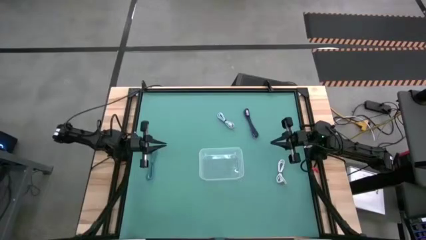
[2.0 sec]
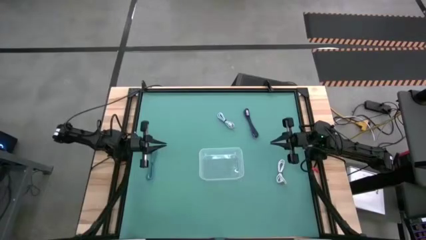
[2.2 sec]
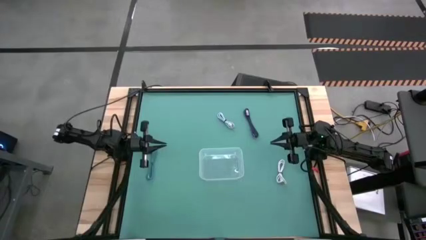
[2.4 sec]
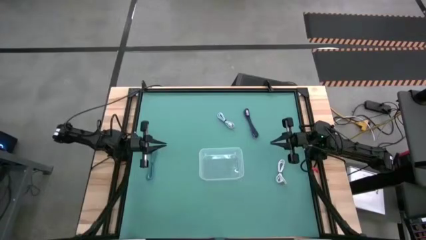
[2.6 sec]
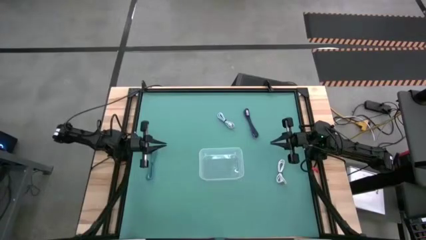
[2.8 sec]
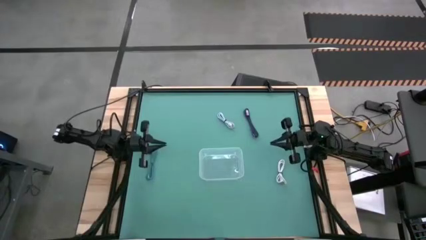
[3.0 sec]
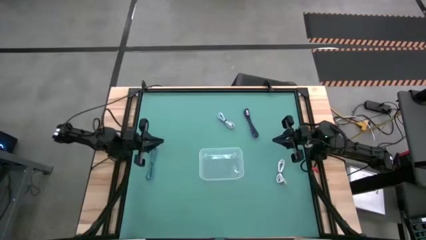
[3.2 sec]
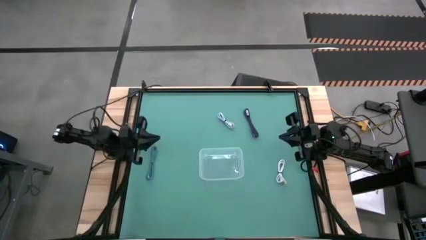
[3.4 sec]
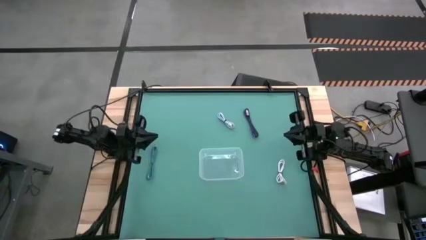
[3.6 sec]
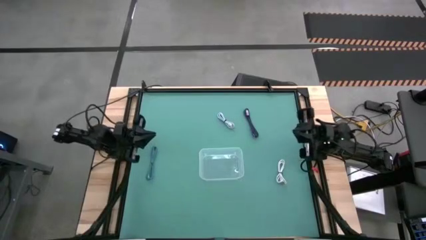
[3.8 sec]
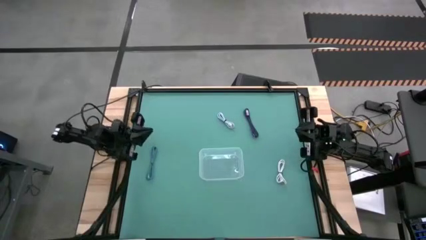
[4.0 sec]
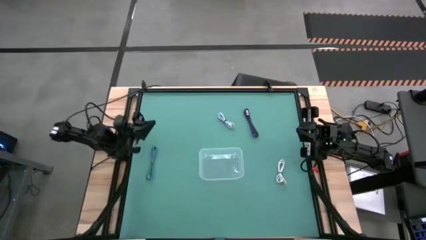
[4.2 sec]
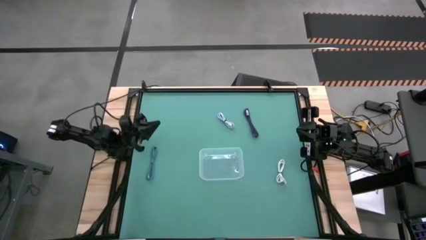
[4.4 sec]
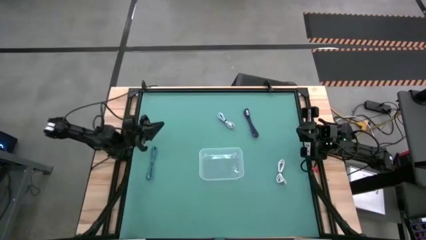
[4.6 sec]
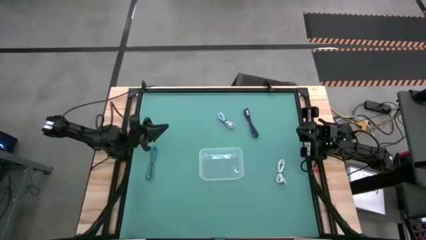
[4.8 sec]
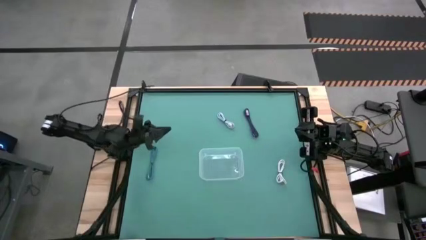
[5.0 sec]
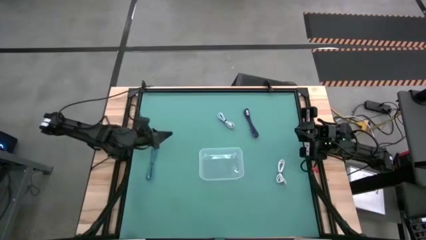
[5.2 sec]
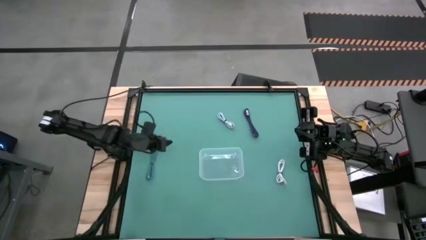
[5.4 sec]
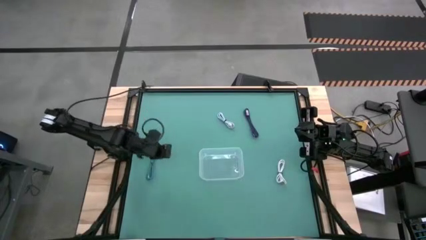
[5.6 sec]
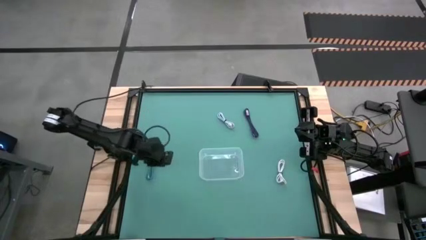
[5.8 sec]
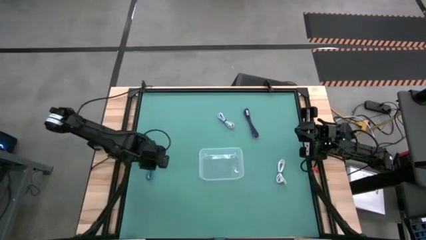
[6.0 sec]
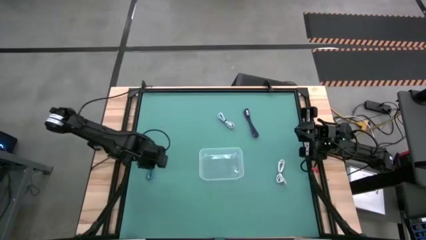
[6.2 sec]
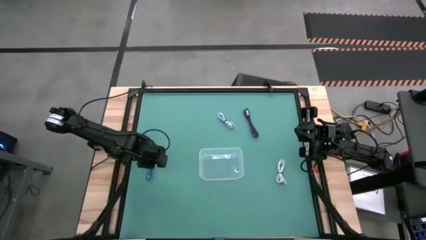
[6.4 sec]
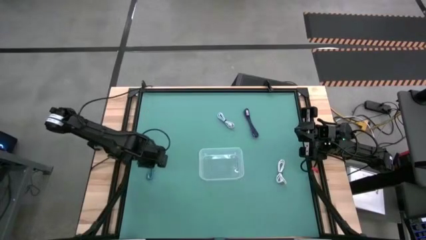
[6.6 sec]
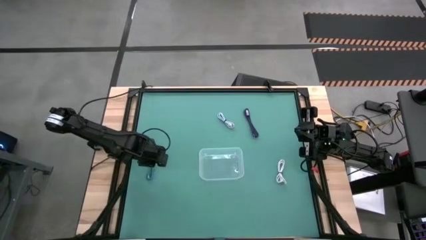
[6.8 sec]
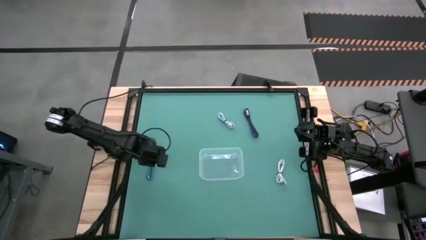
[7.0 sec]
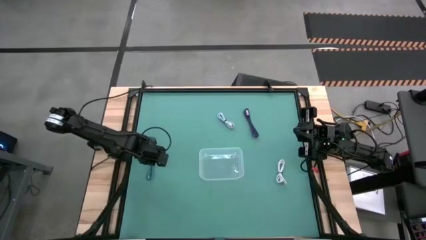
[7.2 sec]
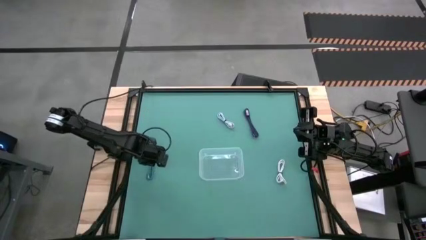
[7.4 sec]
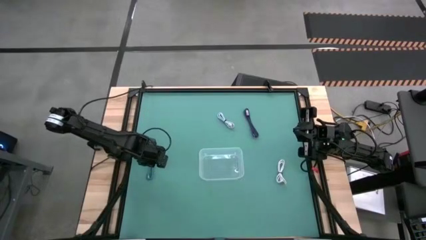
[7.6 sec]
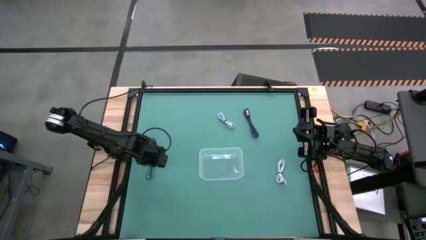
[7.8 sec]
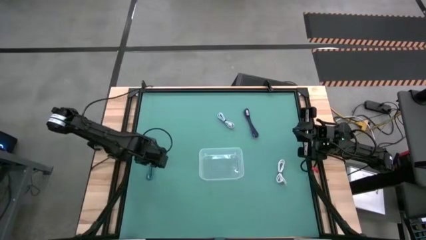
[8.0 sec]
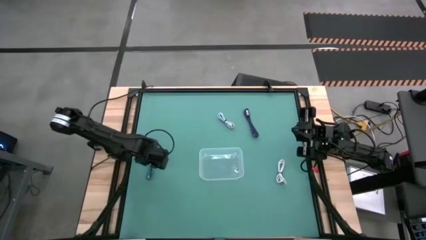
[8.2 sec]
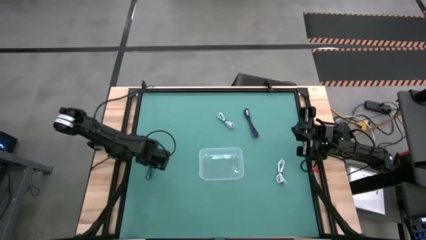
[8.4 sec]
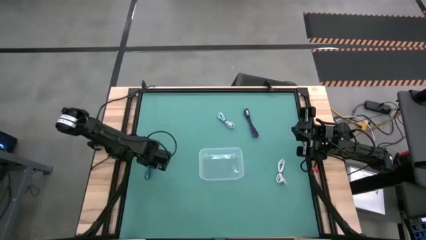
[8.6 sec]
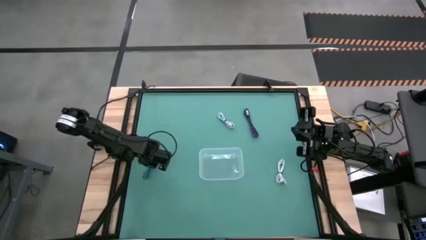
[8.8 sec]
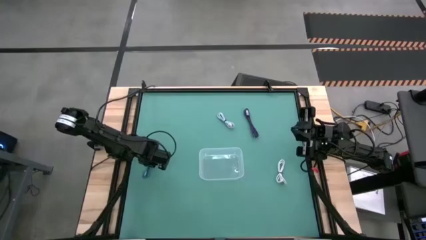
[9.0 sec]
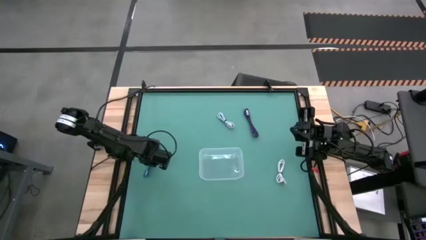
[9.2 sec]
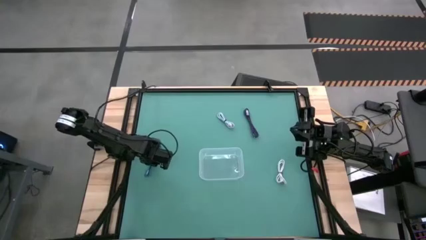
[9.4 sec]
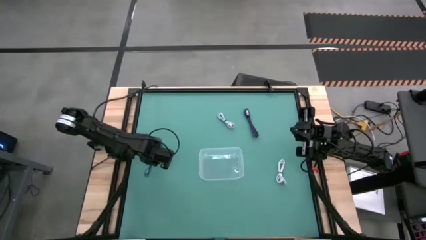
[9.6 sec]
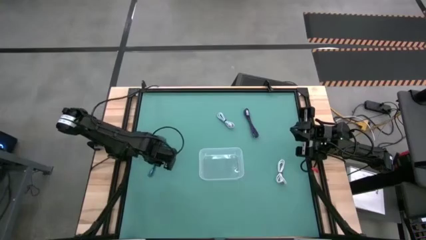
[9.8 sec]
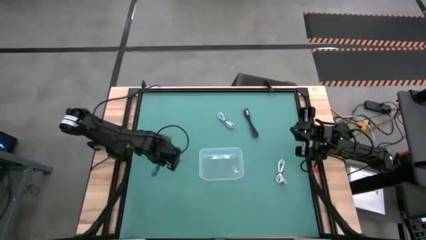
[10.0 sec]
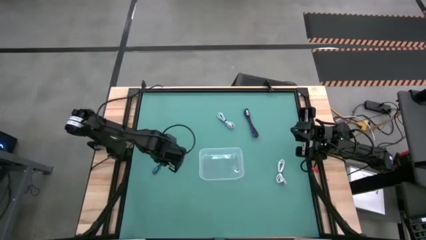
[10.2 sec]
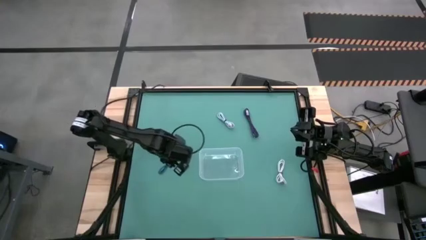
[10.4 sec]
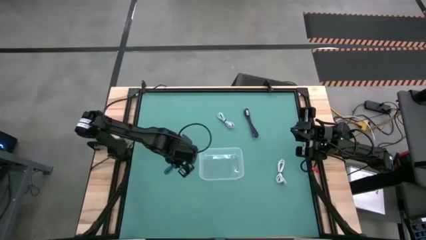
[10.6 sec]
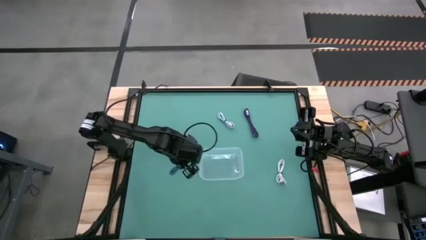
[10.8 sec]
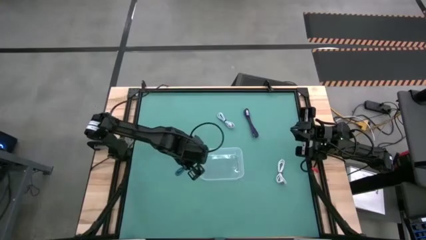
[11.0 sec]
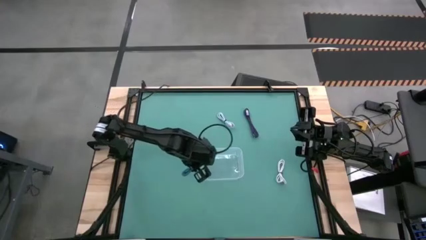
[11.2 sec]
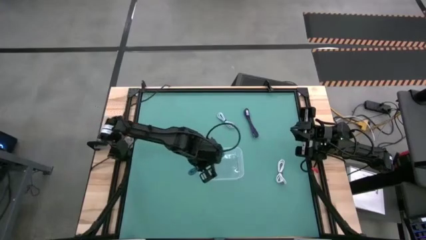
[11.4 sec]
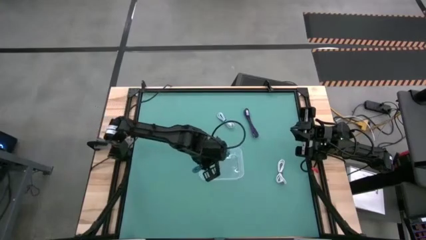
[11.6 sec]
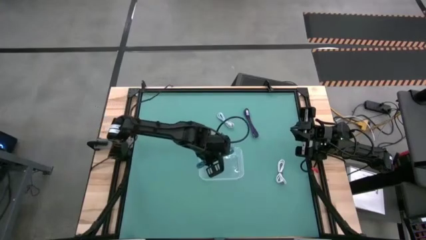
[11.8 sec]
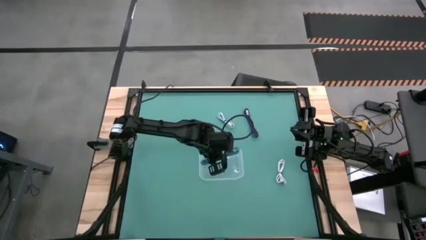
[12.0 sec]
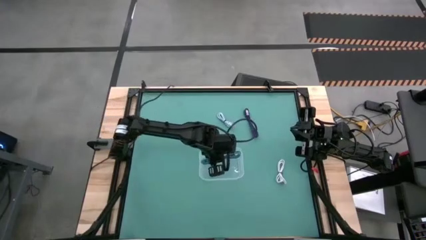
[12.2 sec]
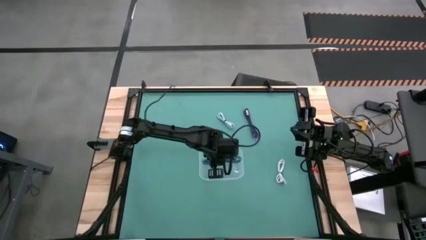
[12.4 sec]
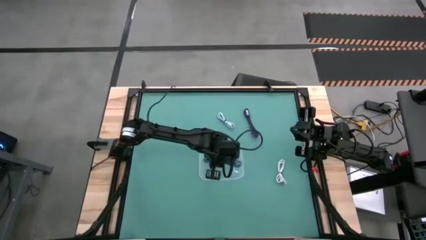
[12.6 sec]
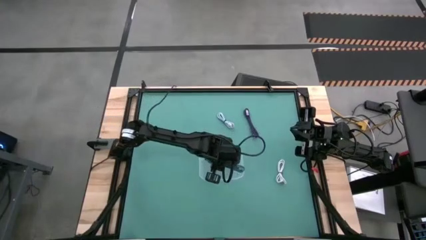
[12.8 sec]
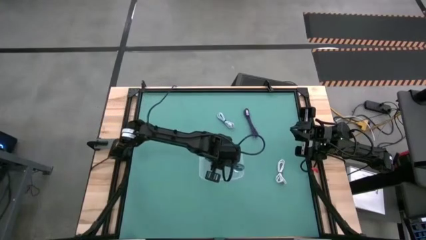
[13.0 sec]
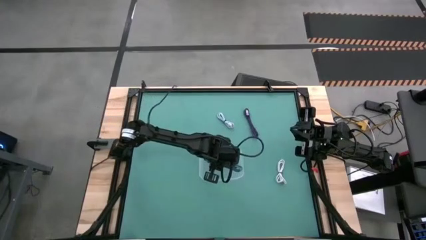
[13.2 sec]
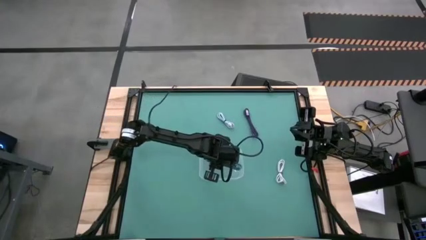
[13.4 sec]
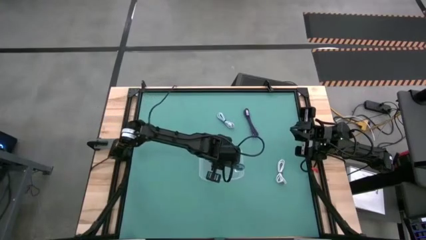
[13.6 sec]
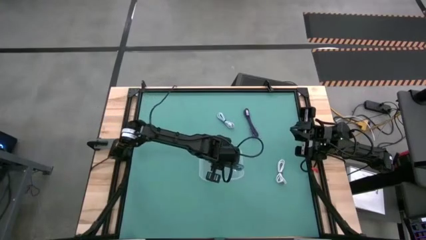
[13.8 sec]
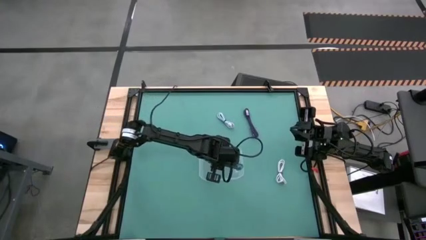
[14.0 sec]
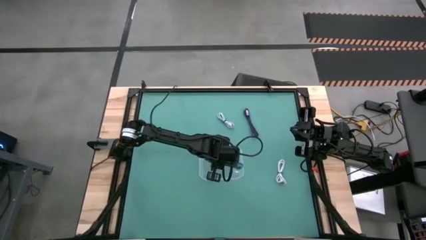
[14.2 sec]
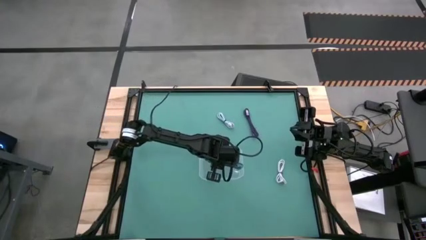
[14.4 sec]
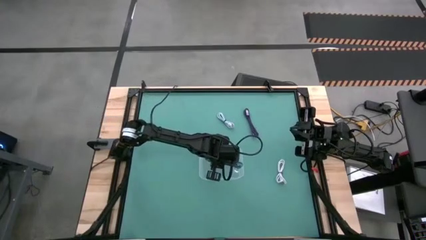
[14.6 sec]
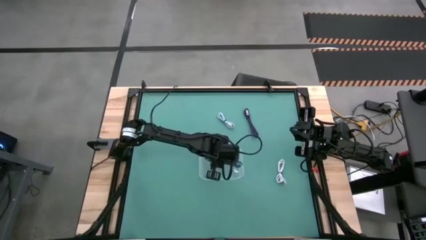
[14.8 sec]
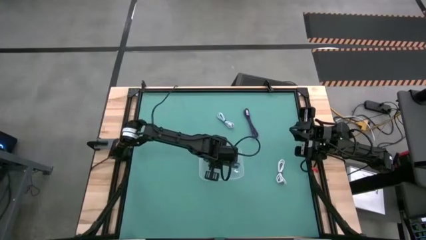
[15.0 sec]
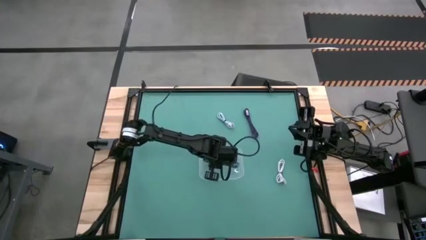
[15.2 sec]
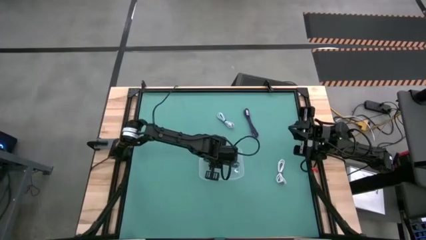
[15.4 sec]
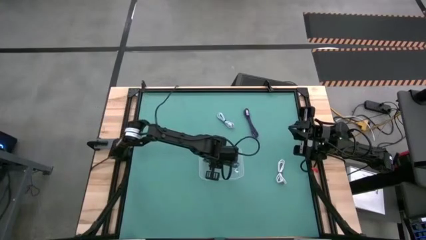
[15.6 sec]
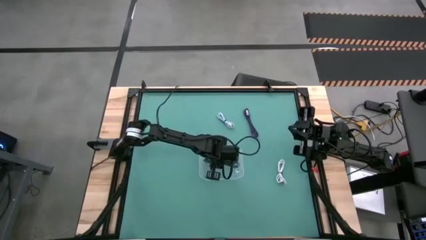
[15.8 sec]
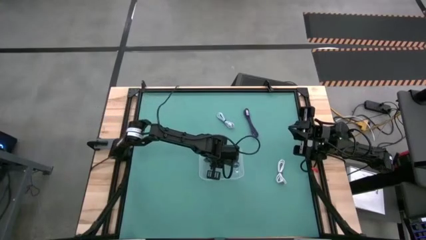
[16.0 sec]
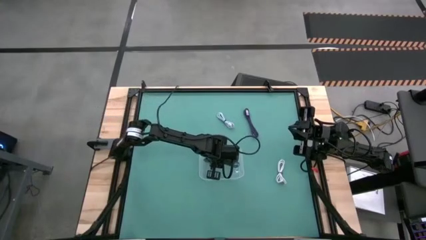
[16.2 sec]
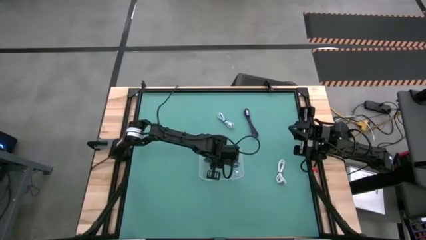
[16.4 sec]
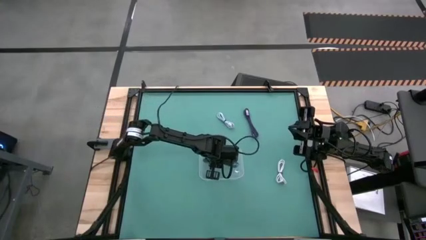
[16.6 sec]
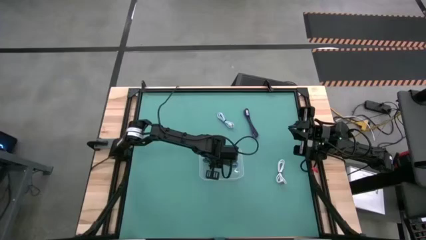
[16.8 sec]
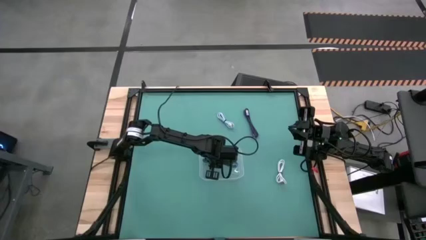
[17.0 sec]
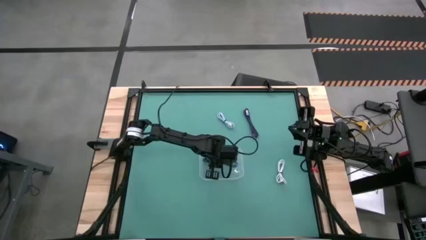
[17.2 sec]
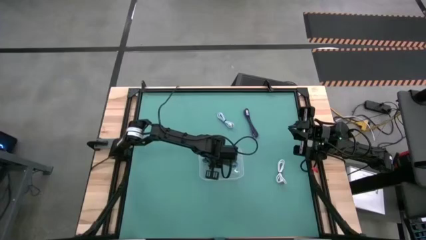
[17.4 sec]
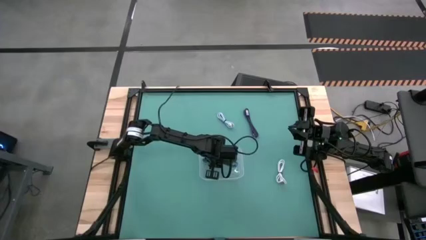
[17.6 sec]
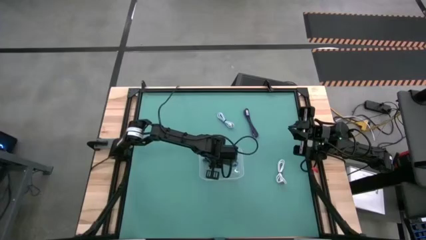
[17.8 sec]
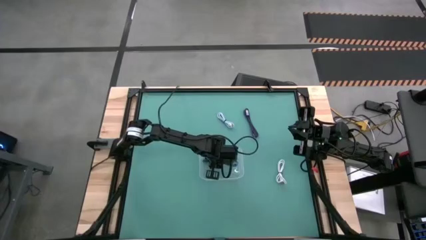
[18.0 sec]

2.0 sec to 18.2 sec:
Task: Pick and place USB-C Cables
Put the blue charger cable into the transparent bin
